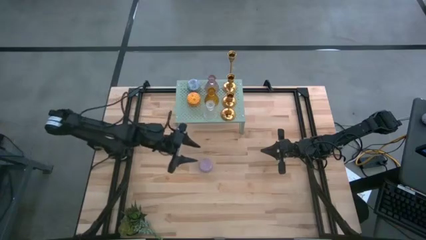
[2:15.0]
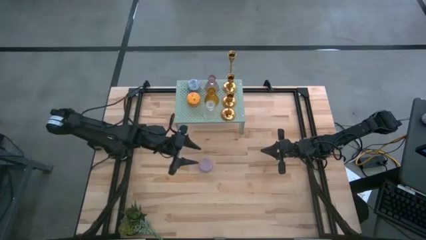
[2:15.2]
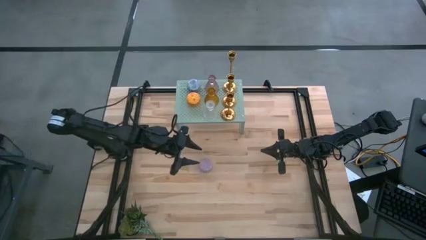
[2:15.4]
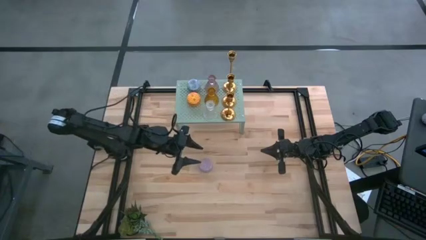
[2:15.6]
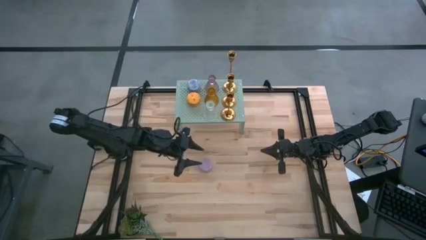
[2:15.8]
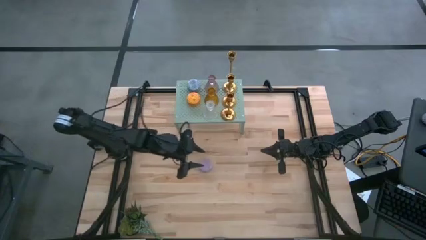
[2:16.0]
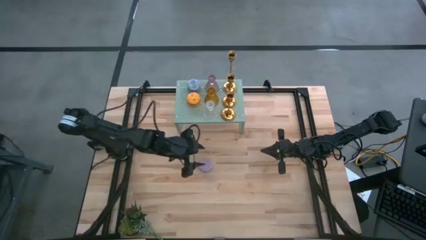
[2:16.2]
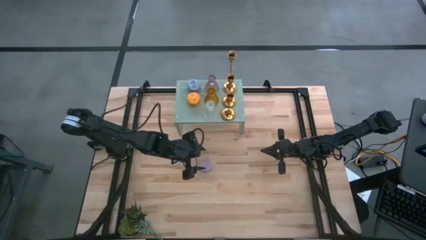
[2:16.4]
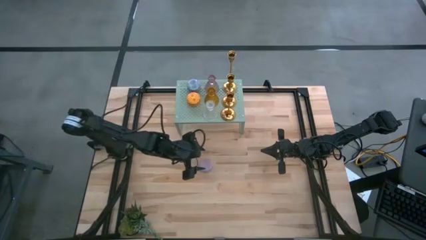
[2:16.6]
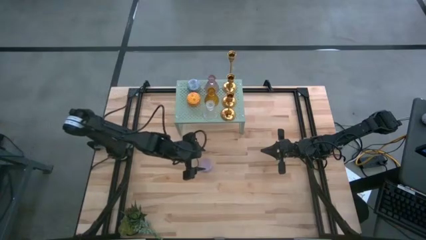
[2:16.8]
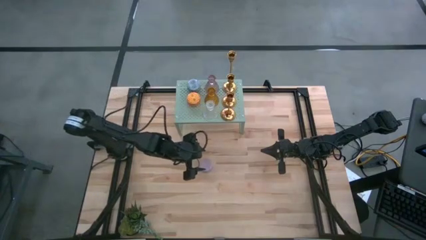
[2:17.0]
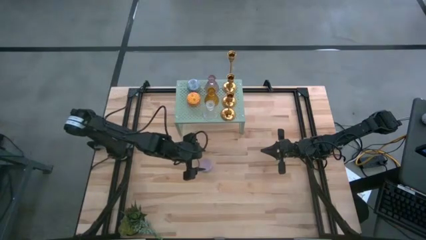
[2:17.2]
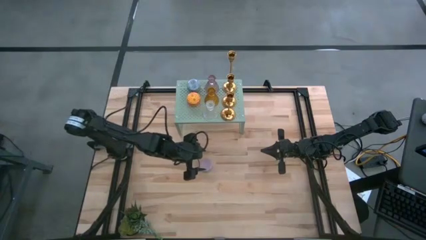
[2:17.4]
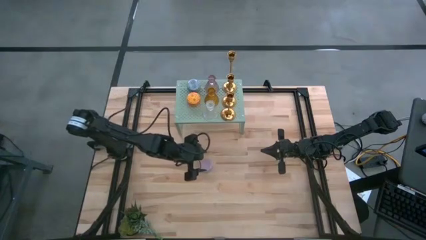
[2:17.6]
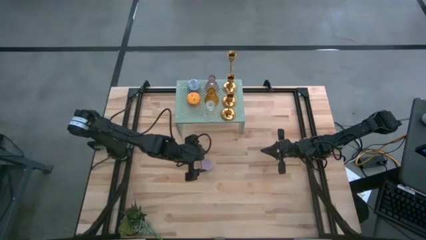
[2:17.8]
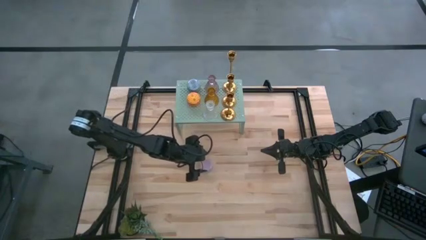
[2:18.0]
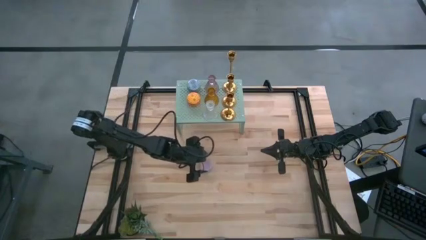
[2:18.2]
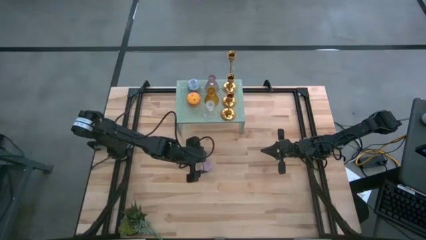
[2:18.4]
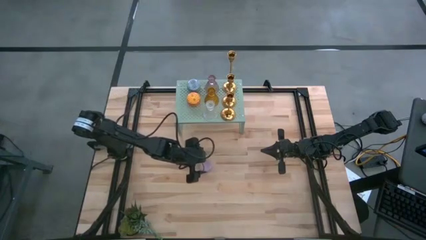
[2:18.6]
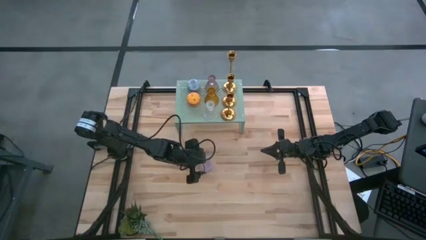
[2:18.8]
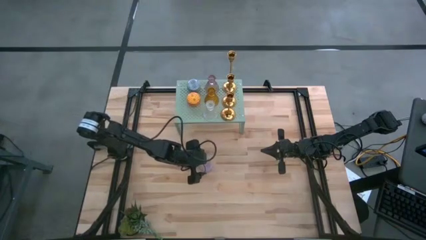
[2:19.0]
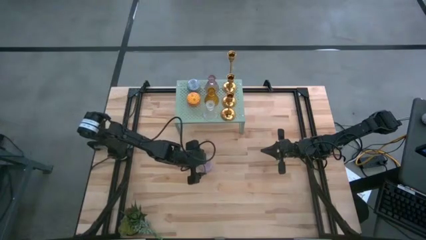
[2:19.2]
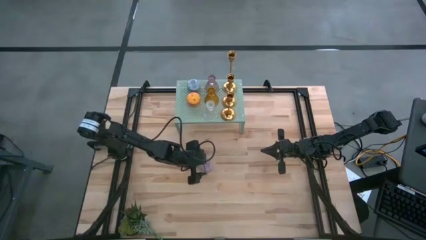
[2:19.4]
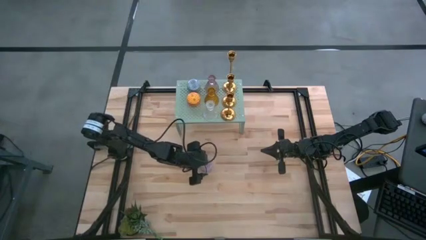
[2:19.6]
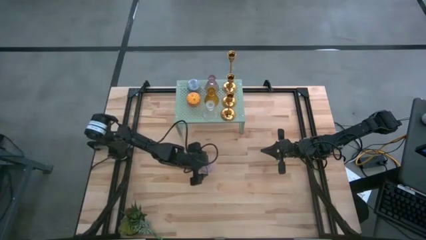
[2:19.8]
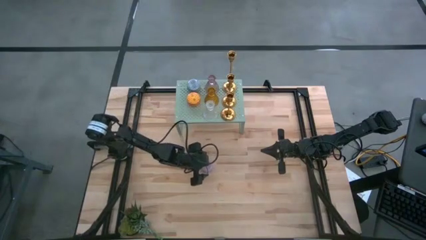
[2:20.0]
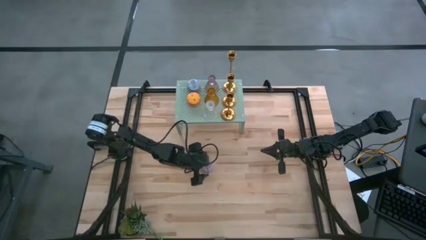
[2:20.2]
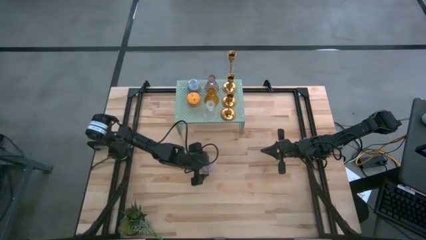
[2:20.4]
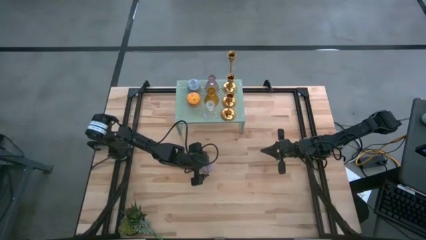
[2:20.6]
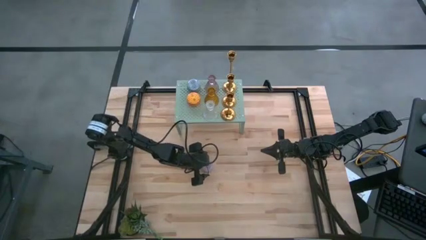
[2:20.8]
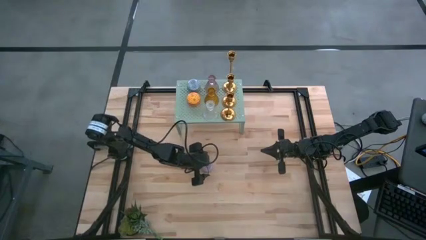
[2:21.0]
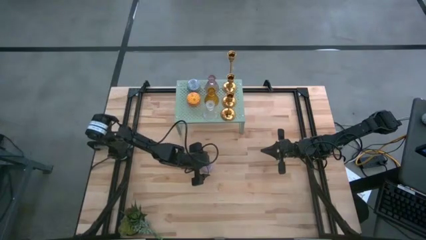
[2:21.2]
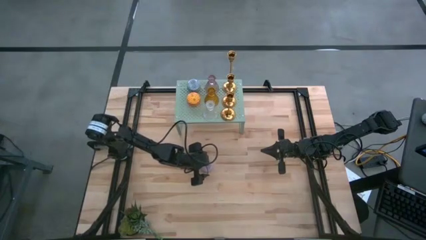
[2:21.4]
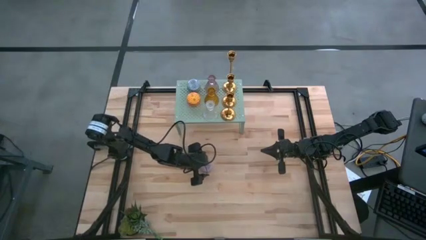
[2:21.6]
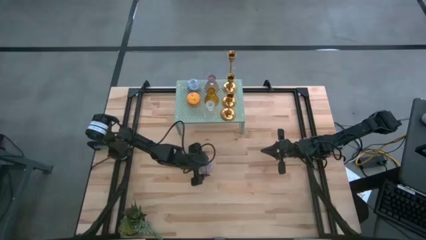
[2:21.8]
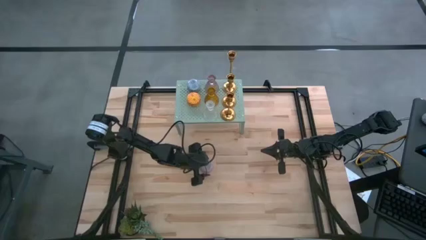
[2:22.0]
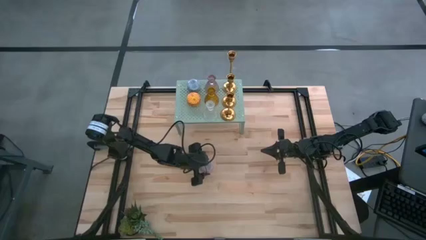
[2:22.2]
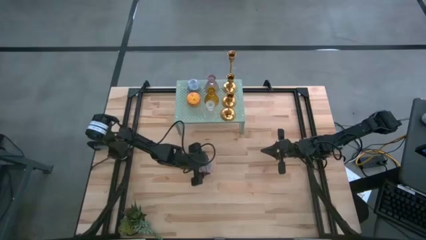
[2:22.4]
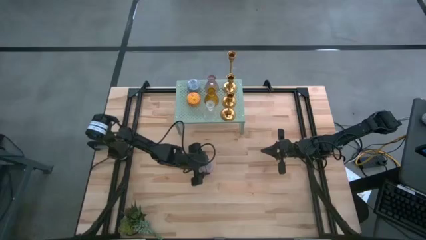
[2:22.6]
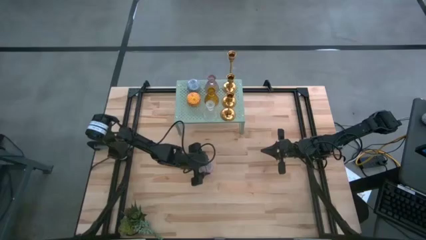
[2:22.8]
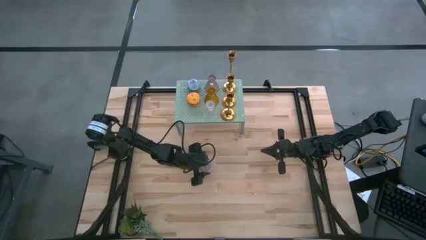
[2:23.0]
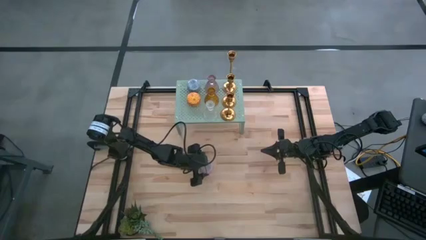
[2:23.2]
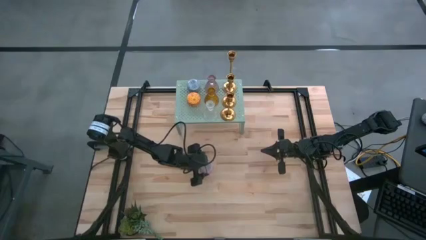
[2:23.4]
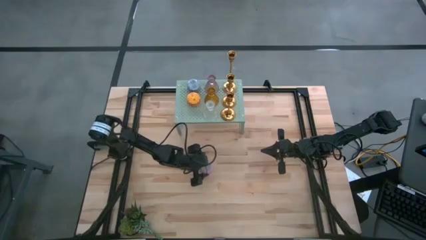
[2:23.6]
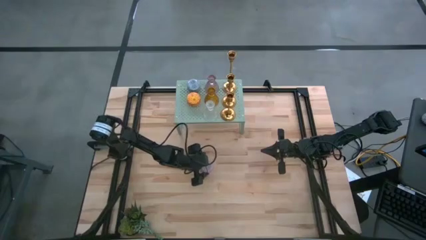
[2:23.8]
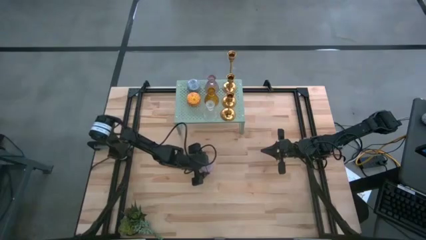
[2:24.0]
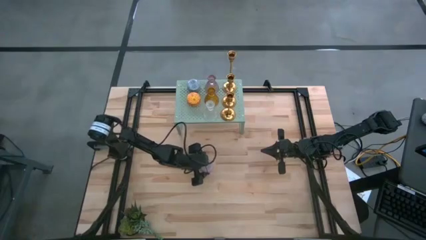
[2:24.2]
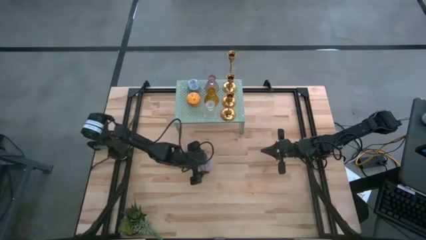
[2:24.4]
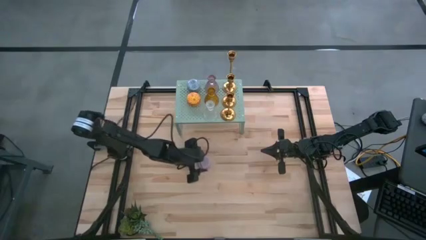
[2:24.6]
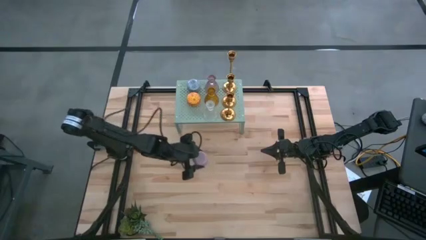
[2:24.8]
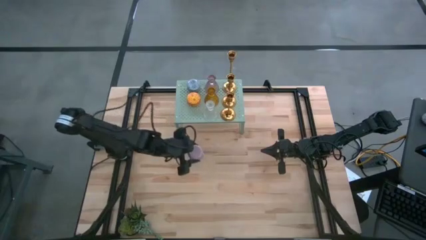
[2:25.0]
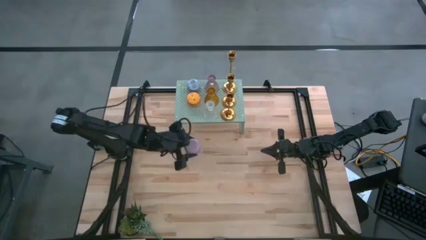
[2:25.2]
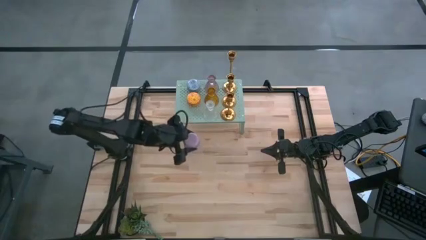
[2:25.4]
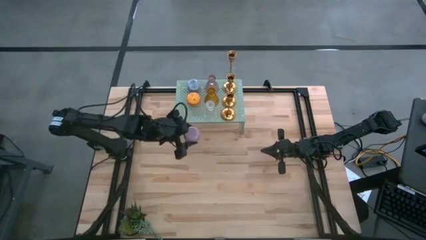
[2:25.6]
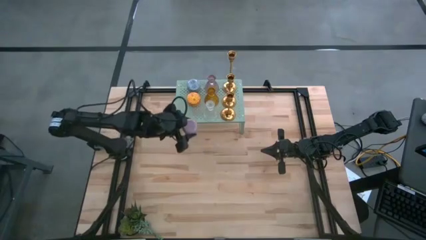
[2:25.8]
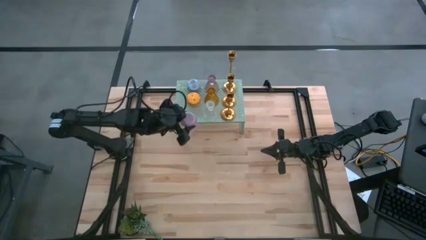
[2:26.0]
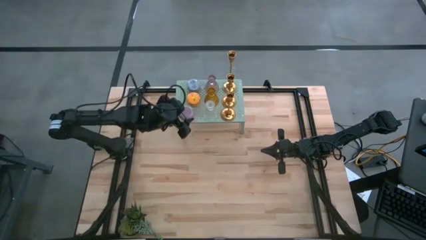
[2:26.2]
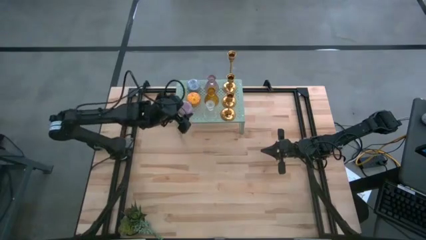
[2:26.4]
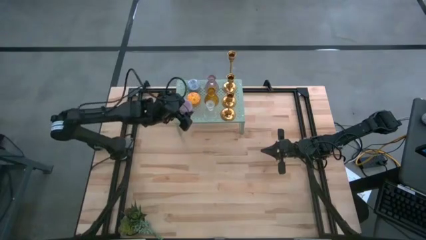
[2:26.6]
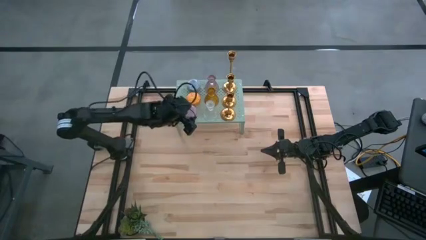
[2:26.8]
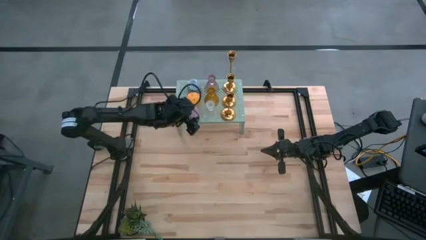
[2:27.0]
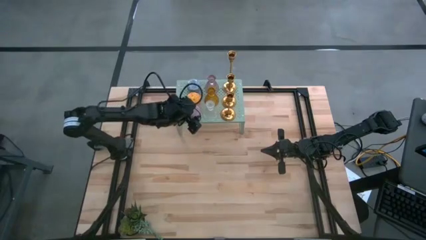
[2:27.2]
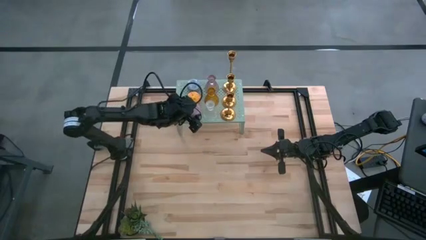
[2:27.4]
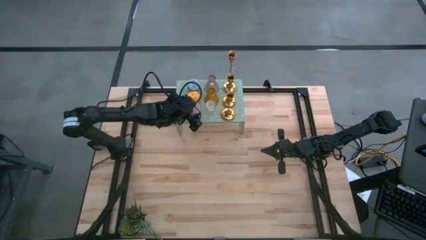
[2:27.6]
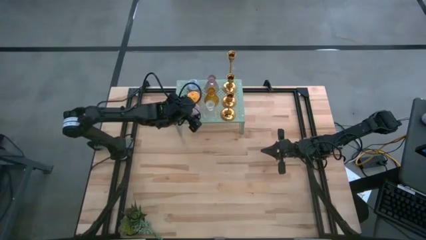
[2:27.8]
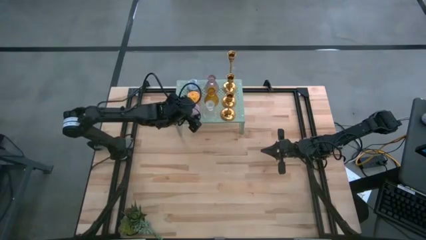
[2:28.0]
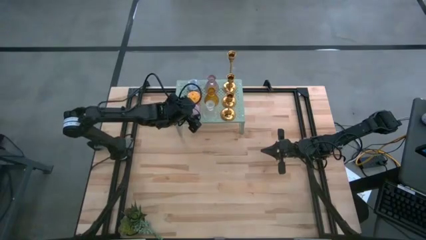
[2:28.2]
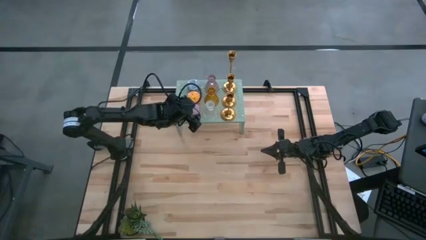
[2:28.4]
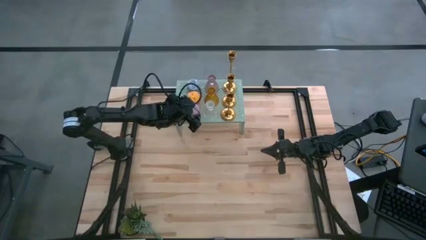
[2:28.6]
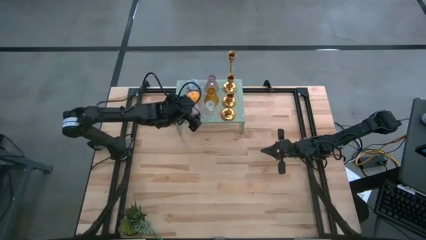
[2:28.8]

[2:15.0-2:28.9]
Task: Pick & Place candle stick holders
Put the pink patterned scented candle on the shelf aligned with the pink patterned scented candle

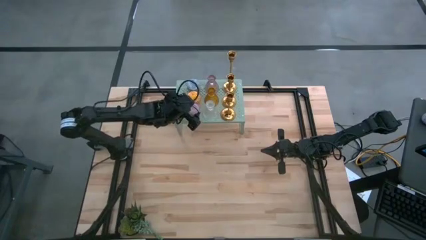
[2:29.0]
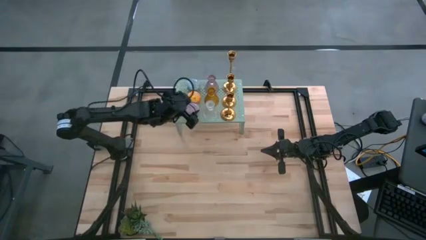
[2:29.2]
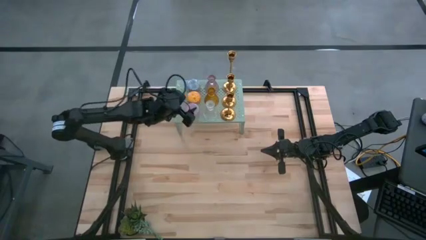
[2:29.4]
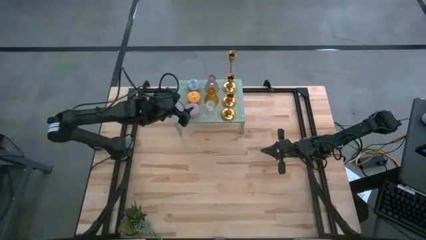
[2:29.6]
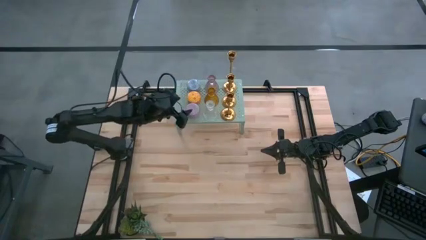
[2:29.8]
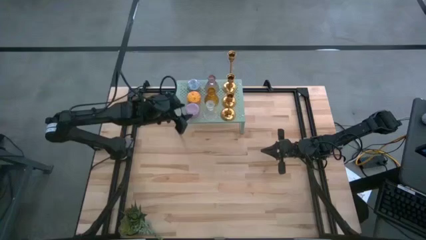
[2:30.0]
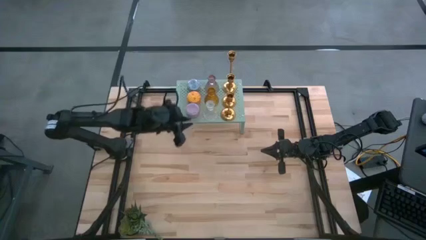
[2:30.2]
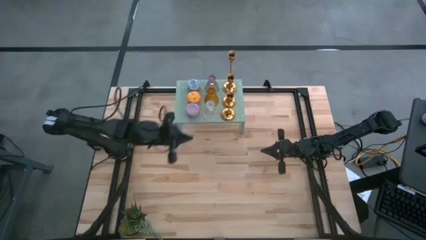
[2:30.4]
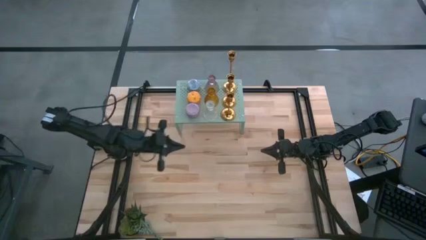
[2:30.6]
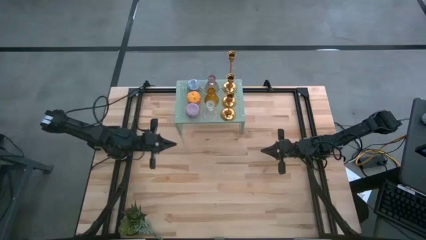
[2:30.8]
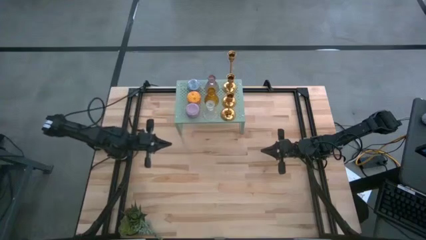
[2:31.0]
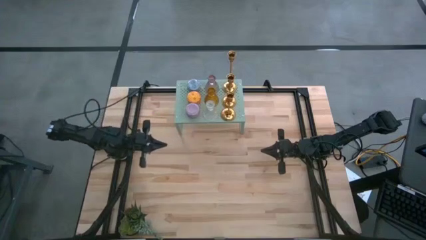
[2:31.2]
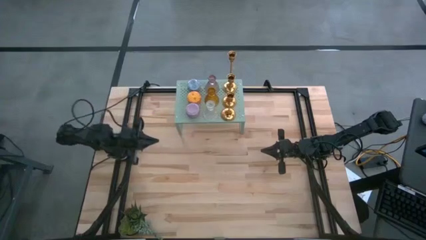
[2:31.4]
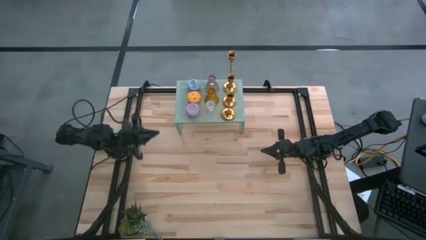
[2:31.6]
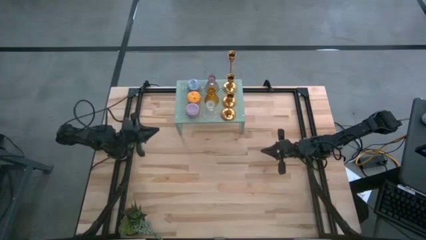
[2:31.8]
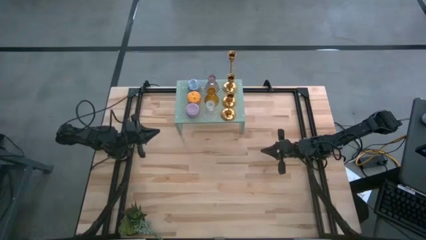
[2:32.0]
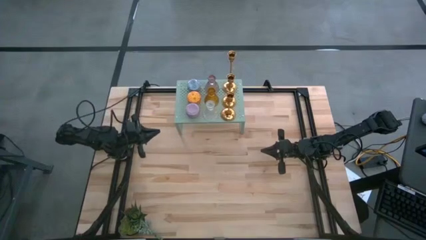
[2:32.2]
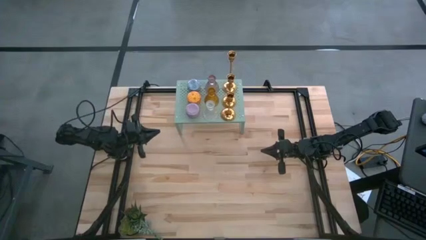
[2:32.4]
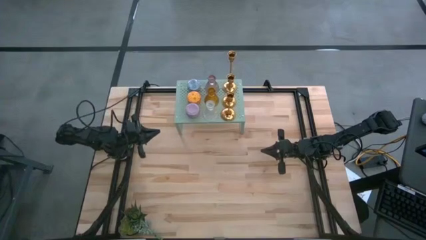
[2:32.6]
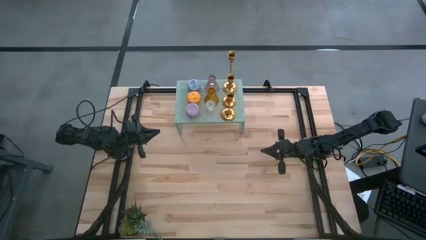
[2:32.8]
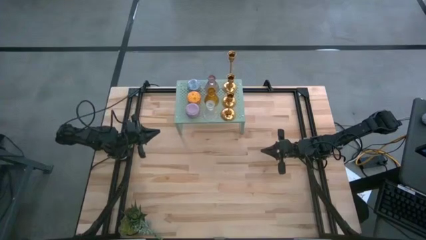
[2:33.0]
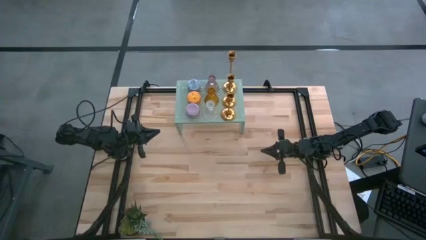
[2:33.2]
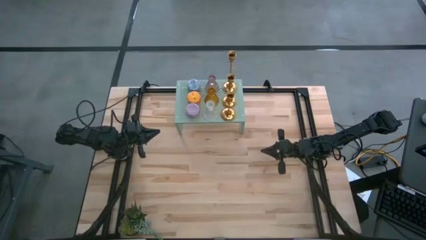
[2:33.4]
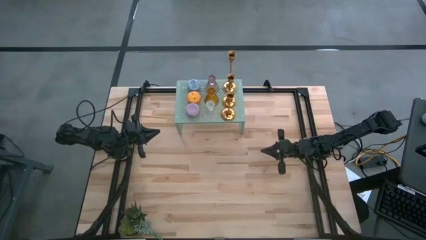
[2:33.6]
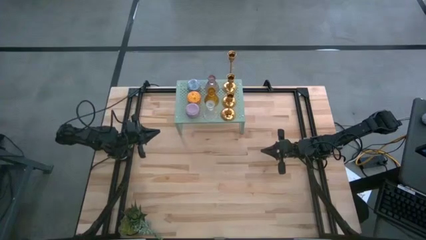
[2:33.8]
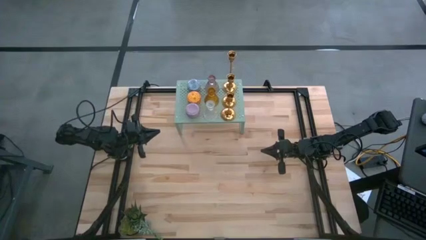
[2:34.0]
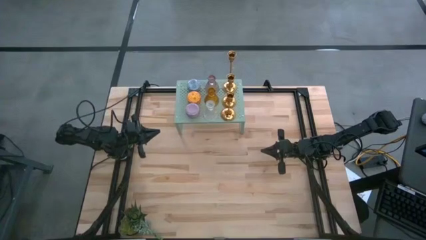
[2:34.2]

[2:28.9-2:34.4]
Return to Home Position
